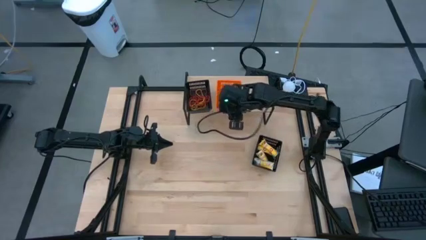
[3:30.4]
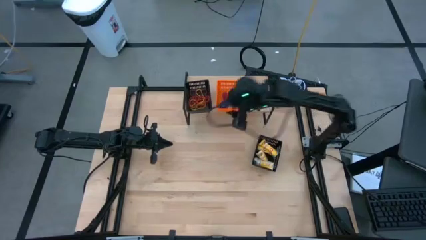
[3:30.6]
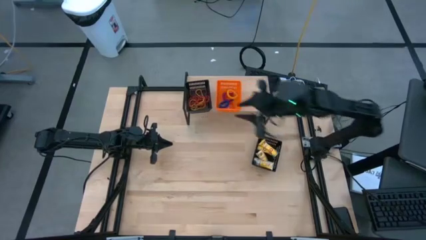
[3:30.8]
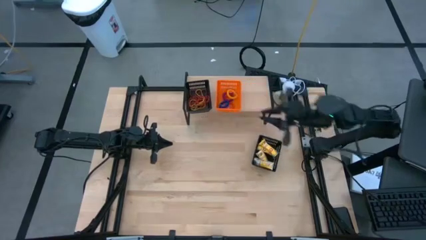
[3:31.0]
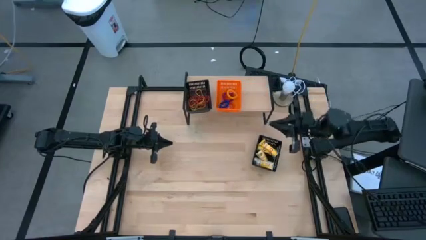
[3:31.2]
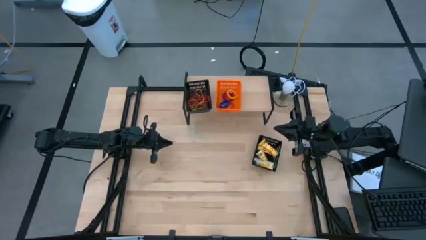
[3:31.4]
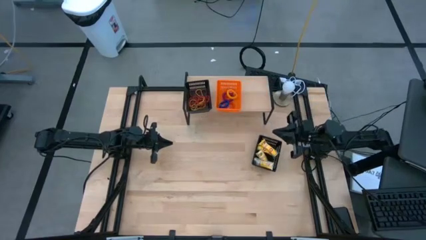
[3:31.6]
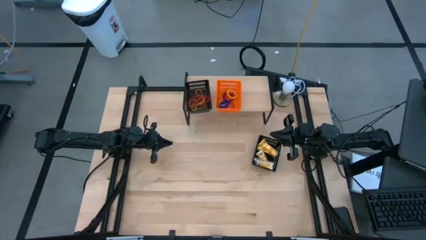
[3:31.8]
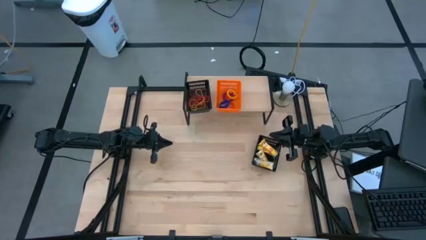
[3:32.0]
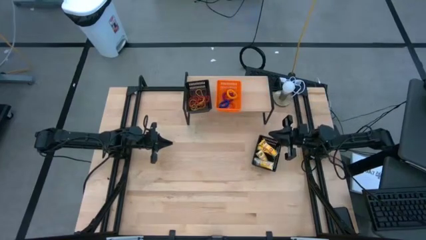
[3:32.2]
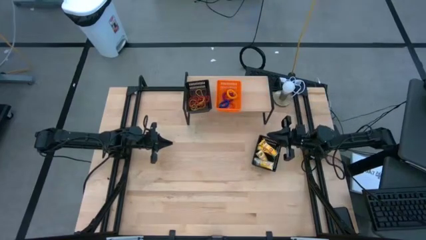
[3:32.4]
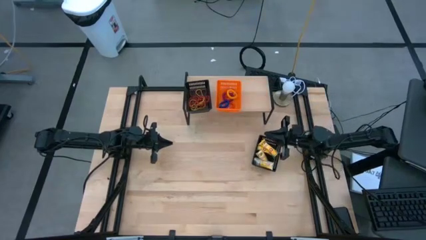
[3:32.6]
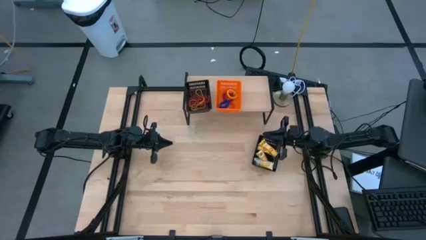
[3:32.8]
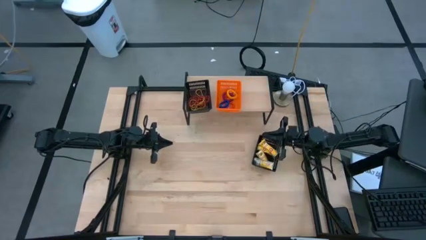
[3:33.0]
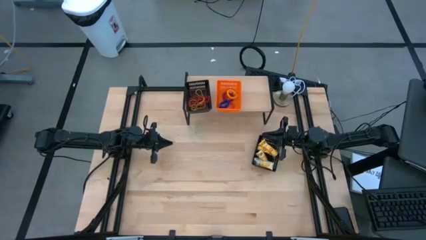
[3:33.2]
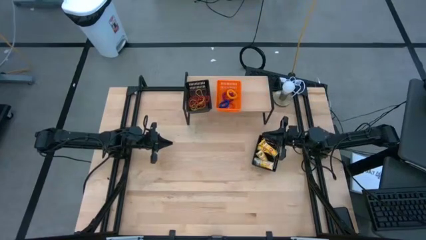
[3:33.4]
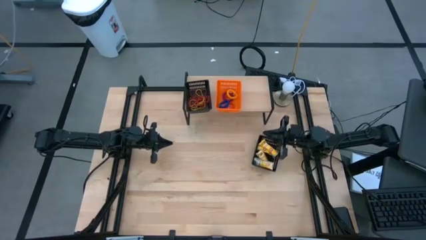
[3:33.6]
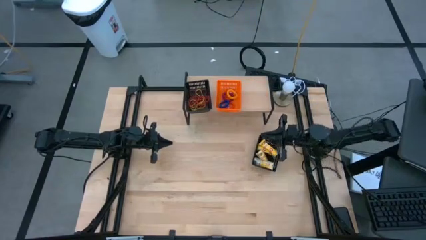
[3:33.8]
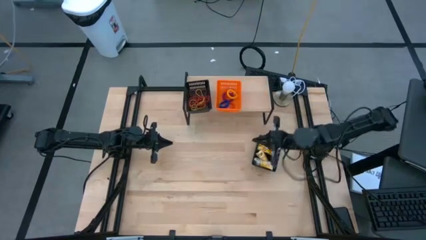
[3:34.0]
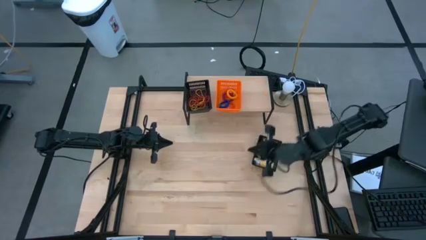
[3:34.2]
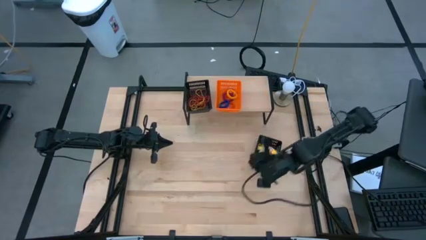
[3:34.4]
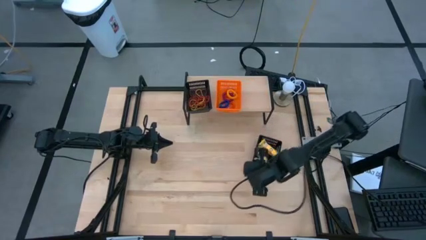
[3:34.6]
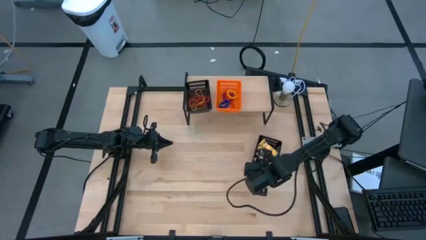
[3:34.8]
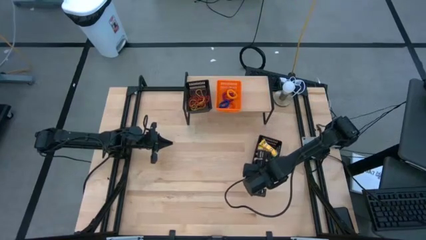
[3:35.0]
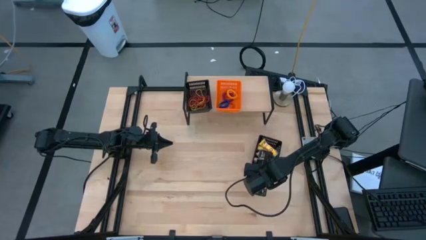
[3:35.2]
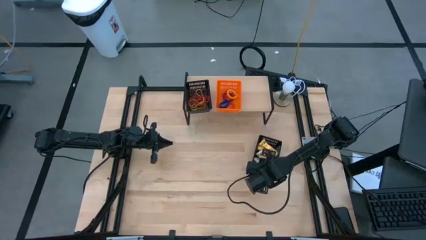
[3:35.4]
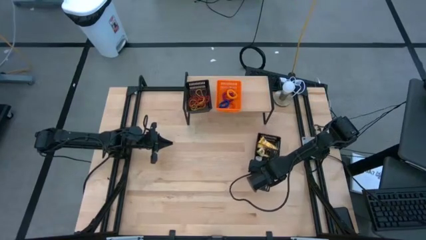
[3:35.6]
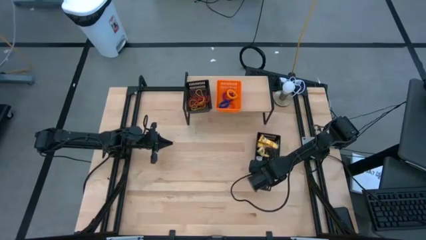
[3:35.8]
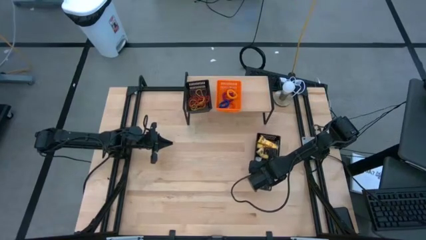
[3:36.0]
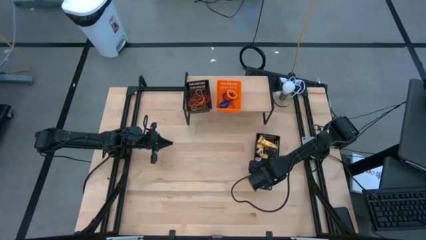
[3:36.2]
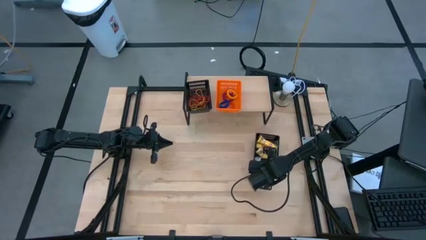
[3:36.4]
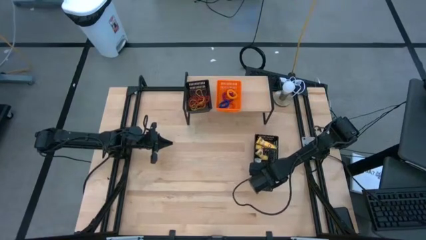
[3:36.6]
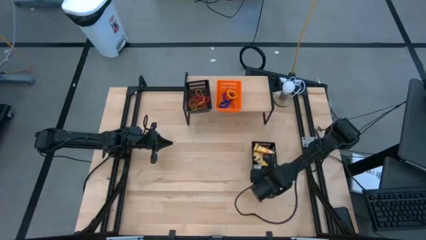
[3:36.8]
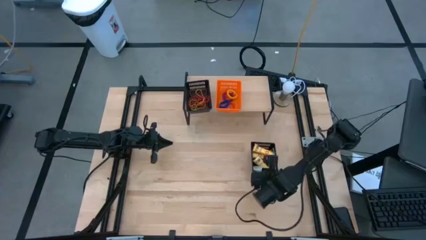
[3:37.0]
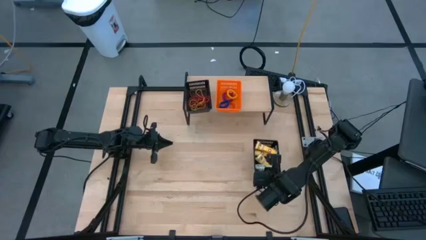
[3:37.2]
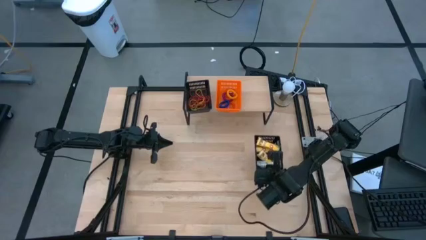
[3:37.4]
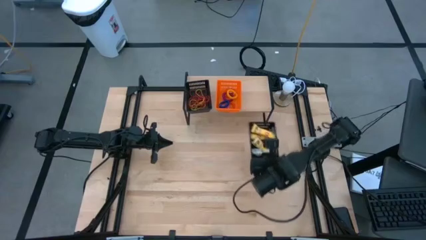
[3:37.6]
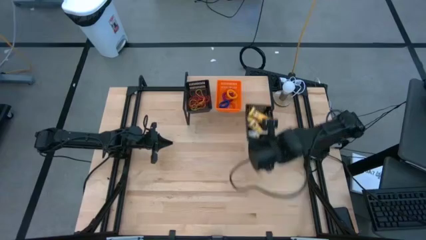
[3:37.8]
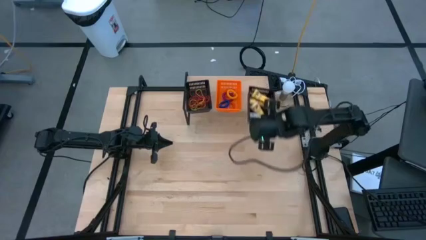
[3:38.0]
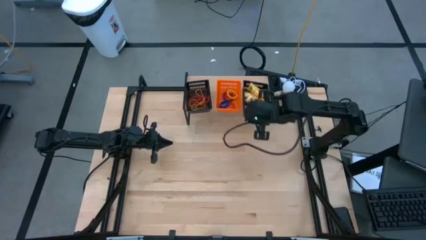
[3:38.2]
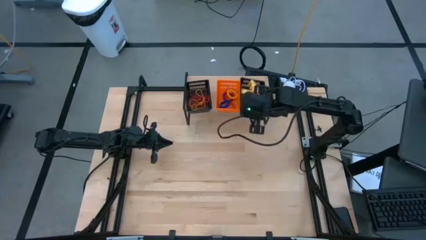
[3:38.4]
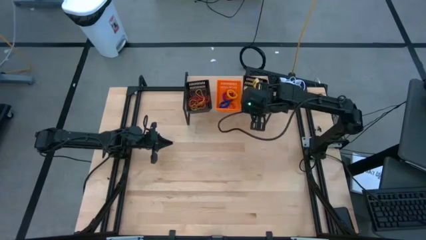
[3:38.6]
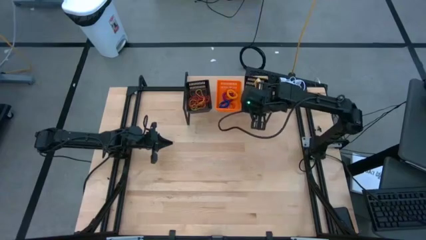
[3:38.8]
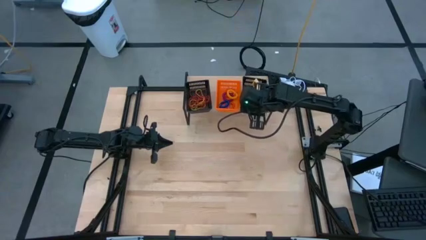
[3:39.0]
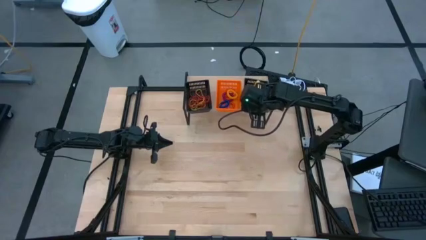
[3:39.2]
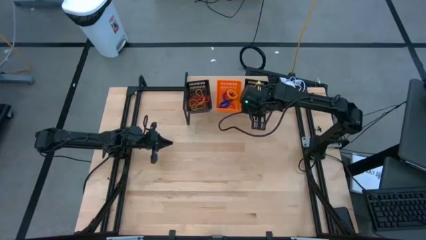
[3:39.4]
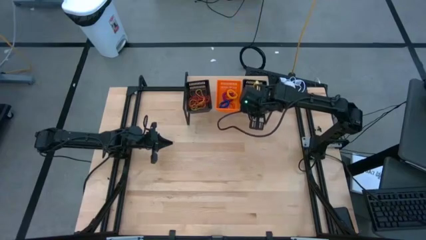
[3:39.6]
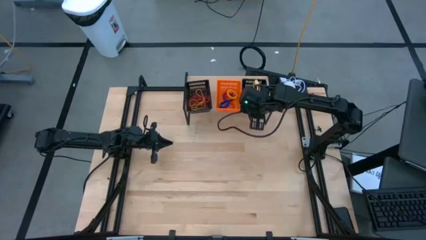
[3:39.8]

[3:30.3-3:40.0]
Task: Pick & Place Office Desk Supplies
Put the black bin on the shelf

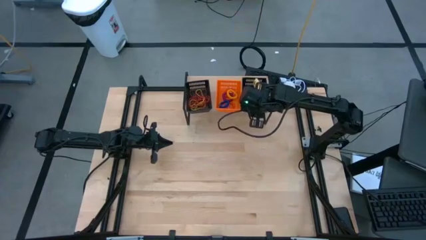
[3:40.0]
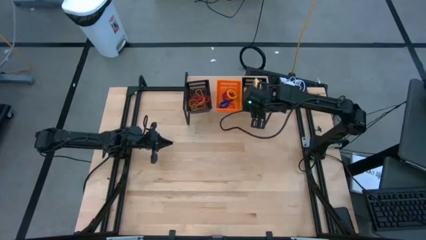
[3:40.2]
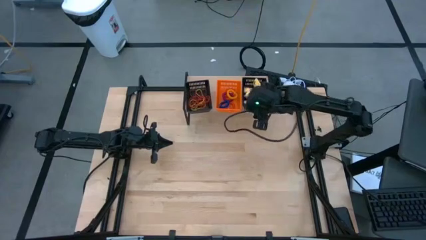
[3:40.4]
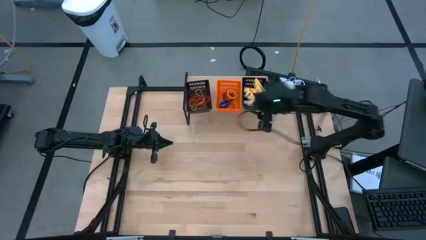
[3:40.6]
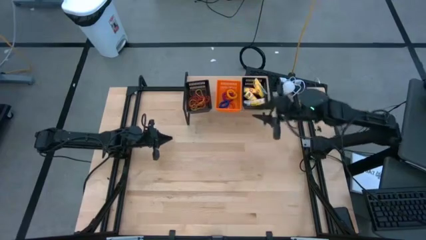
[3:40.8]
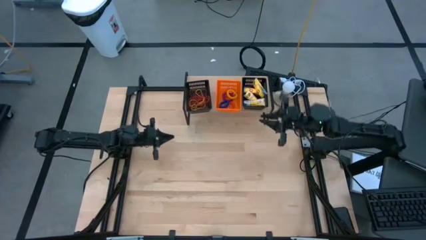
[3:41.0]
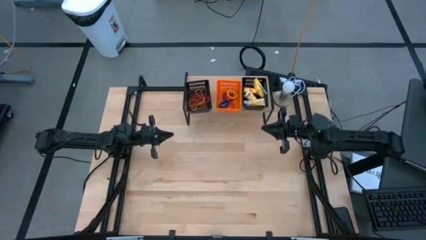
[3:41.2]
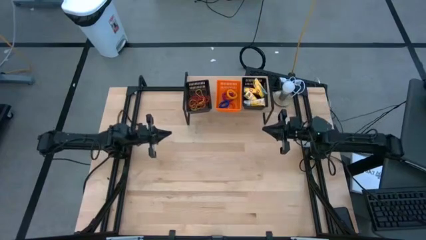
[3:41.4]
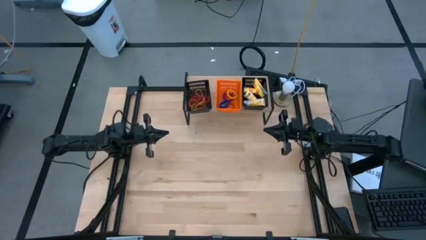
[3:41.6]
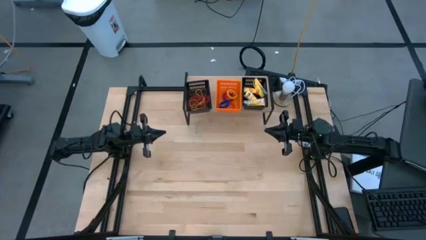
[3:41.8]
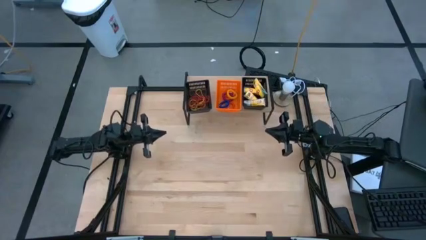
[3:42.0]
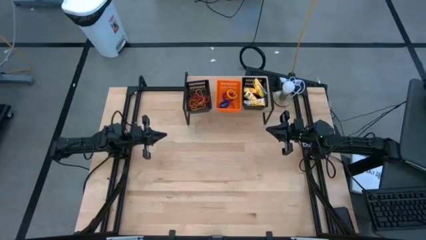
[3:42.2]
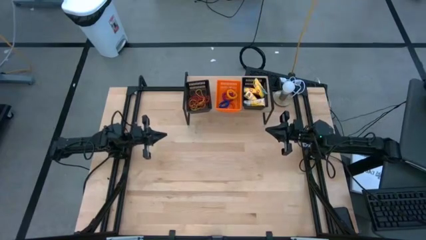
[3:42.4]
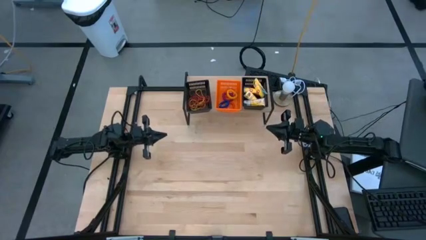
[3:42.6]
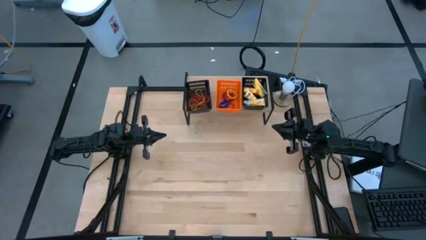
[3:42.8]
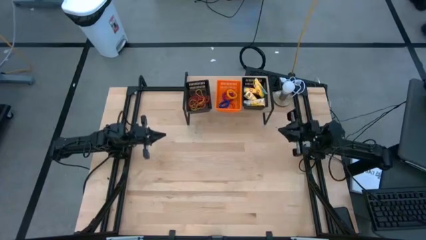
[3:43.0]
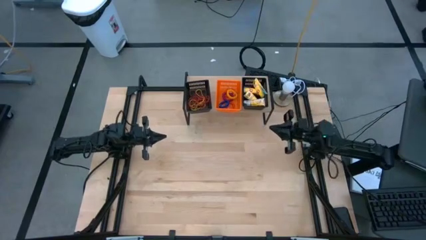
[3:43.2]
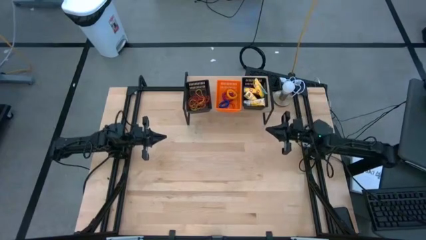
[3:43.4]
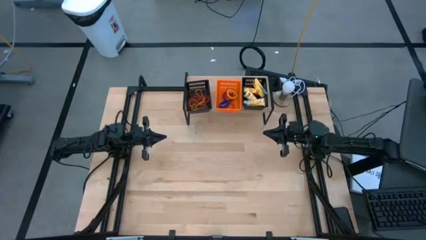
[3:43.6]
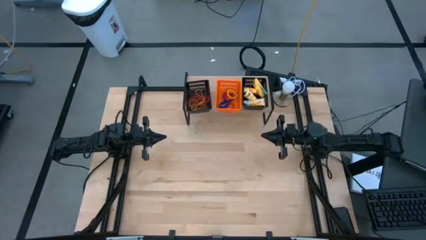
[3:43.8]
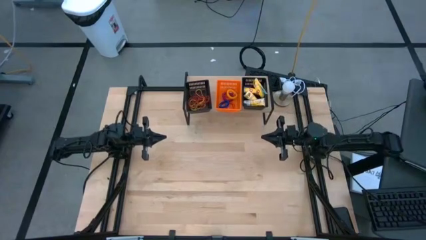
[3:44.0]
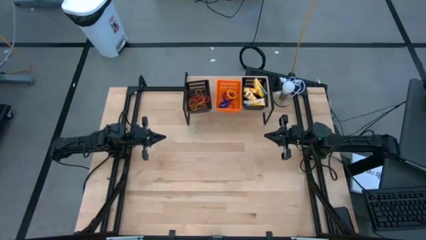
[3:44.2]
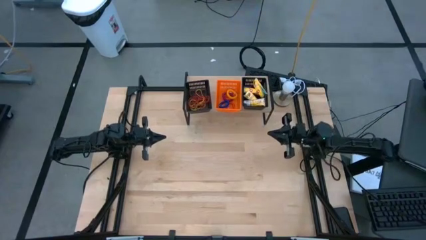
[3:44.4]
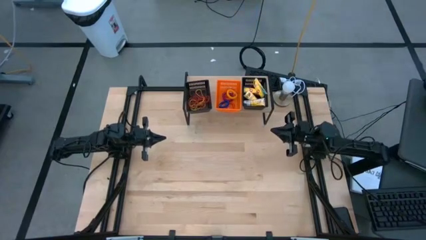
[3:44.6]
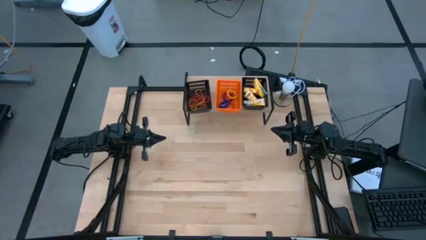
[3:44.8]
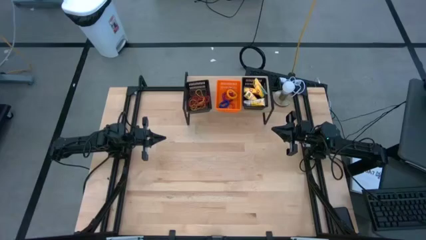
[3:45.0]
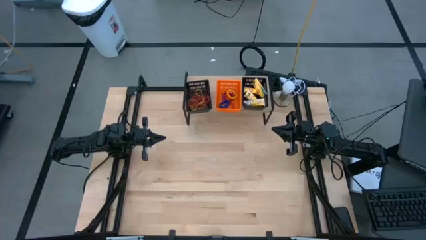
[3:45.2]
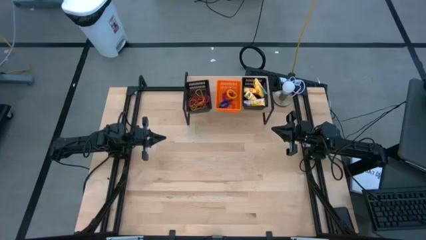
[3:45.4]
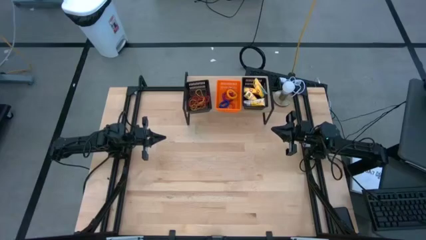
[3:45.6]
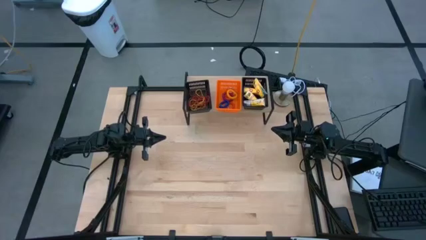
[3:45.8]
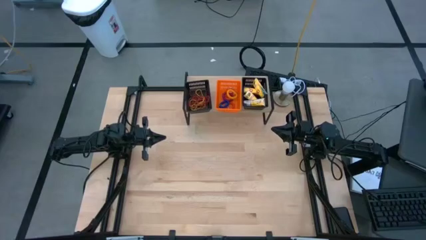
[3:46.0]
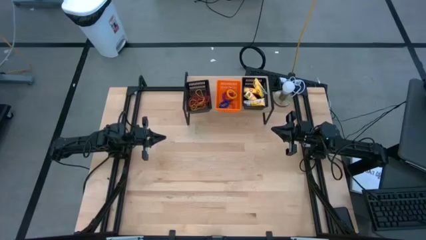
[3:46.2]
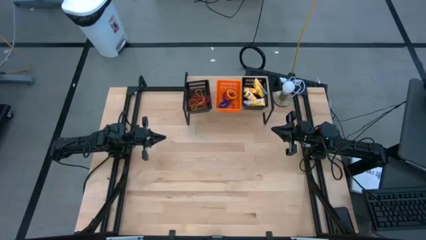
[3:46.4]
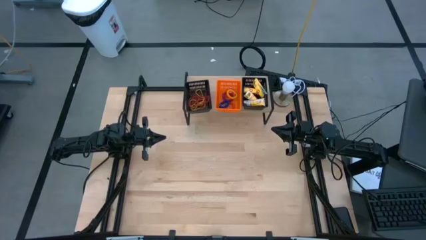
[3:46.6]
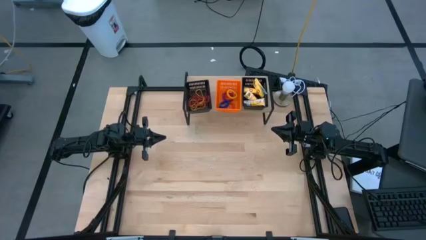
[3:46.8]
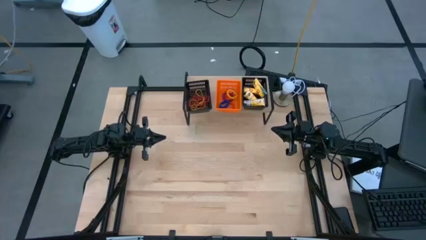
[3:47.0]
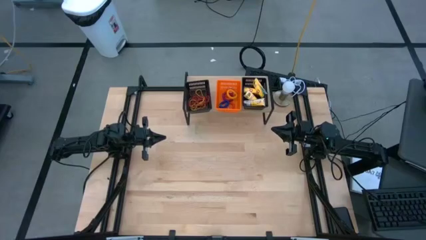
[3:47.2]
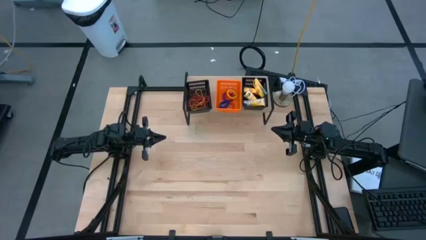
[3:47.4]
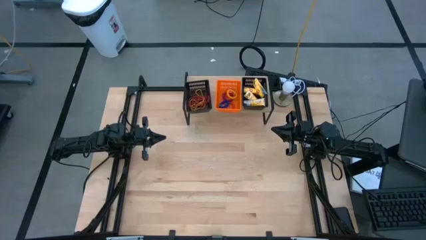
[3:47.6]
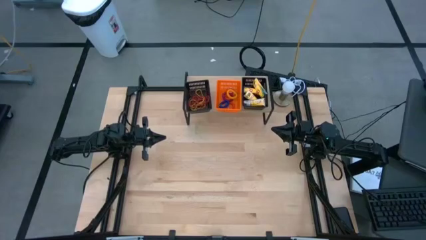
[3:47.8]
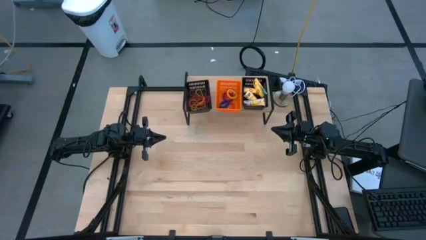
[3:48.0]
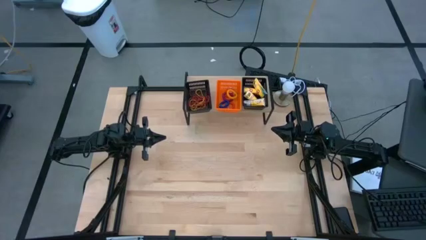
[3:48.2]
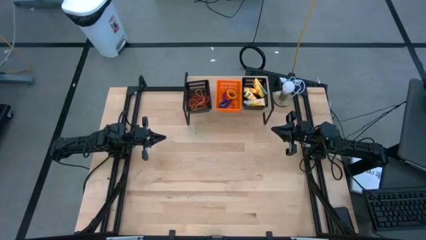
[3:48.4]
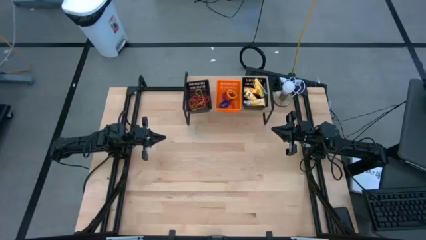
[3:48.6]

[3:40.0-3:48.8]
Return to Home Position
